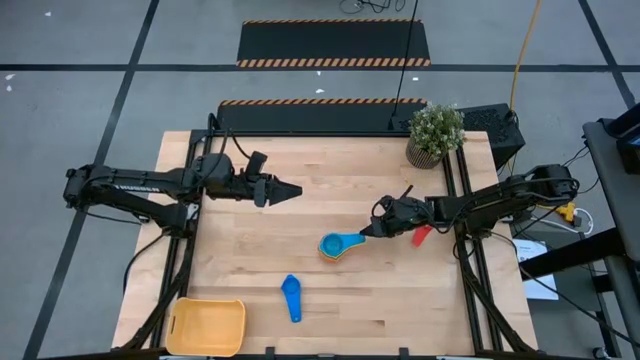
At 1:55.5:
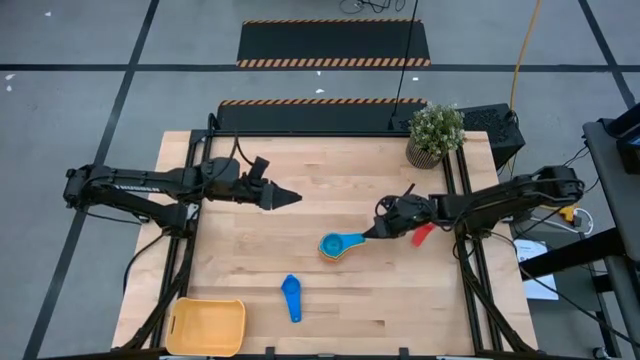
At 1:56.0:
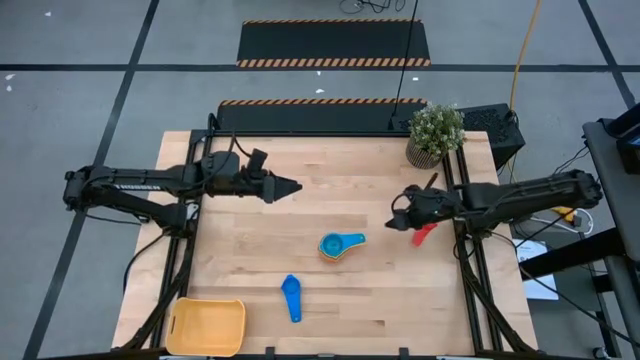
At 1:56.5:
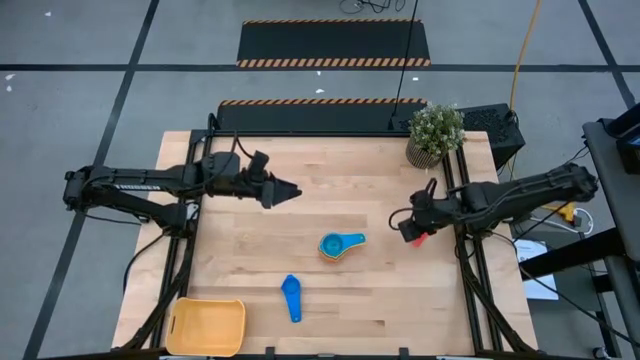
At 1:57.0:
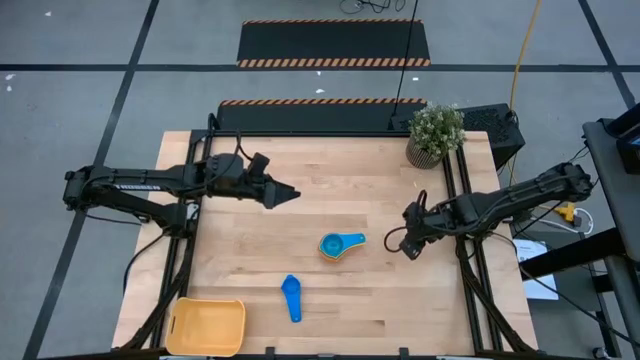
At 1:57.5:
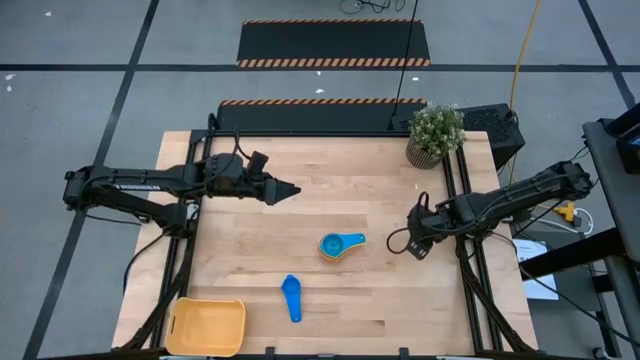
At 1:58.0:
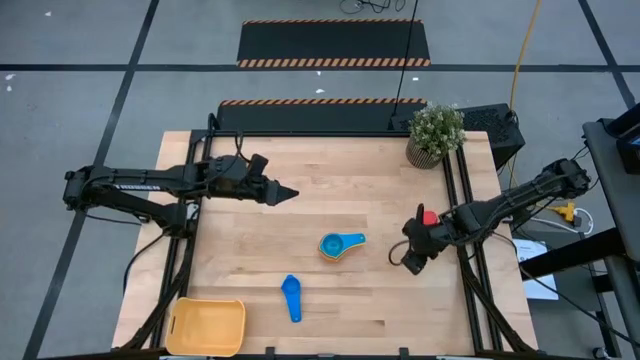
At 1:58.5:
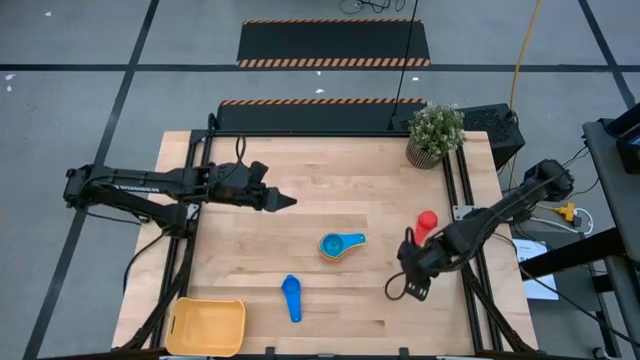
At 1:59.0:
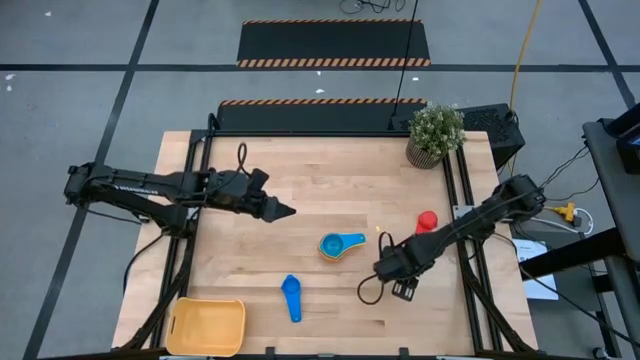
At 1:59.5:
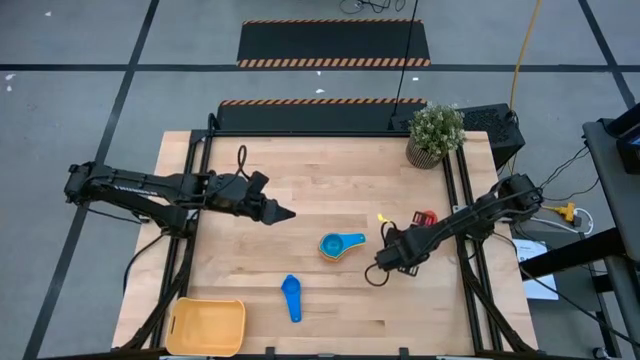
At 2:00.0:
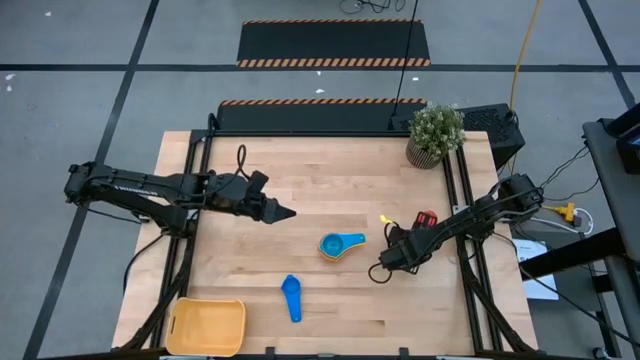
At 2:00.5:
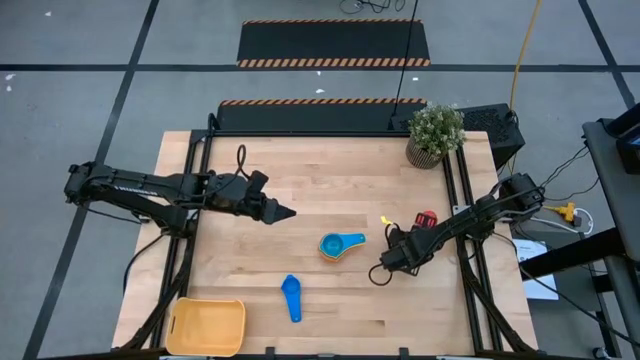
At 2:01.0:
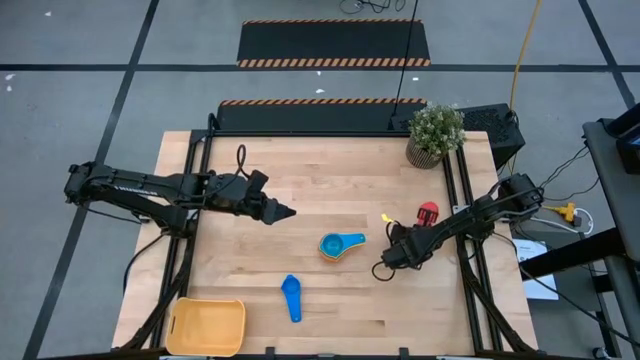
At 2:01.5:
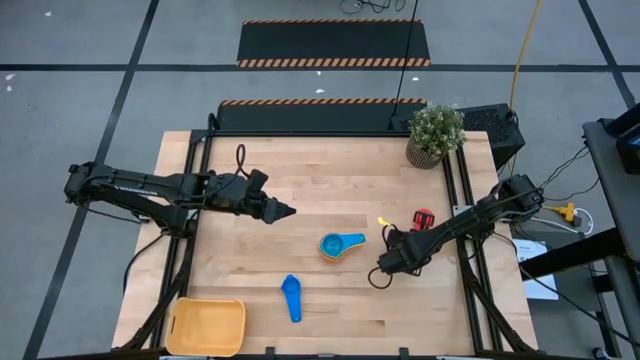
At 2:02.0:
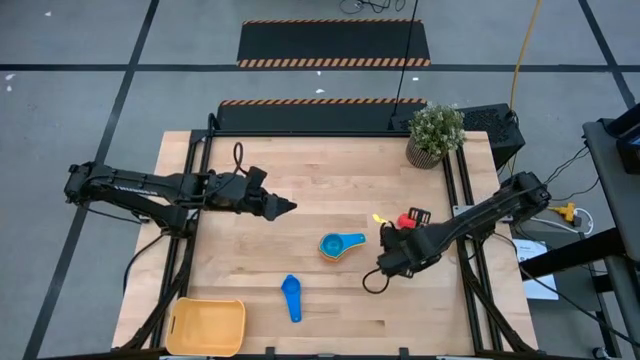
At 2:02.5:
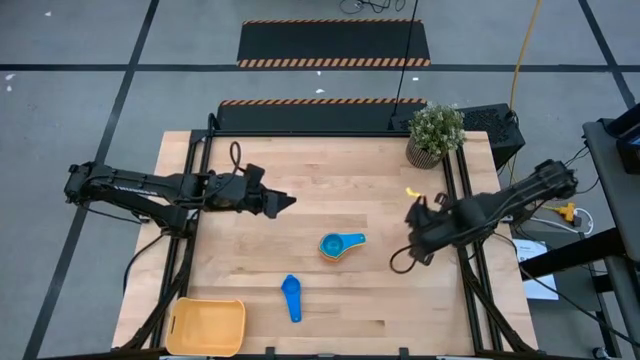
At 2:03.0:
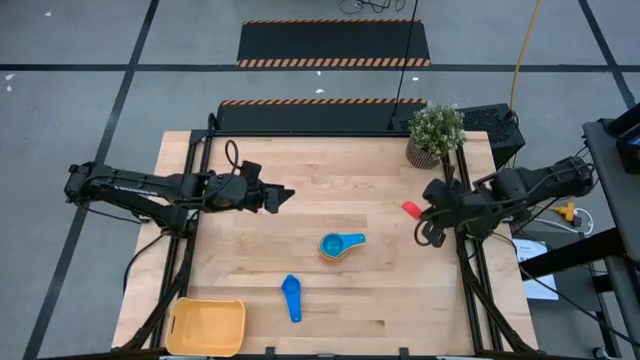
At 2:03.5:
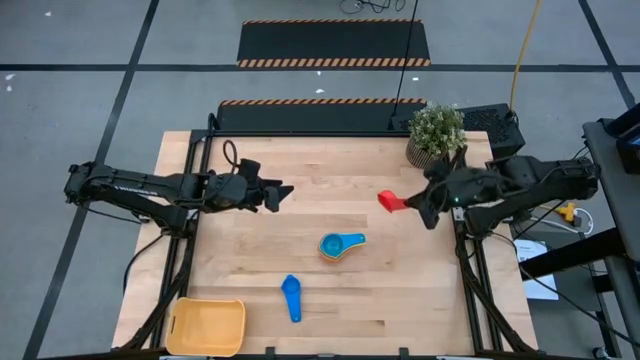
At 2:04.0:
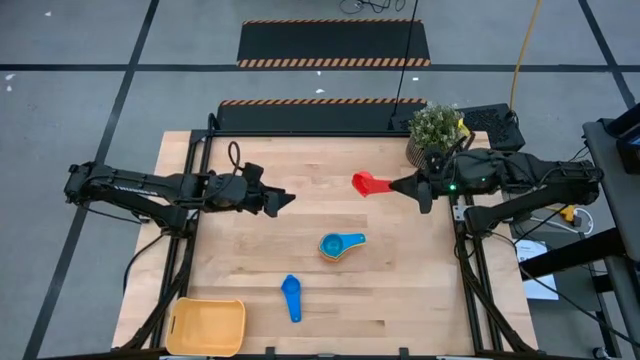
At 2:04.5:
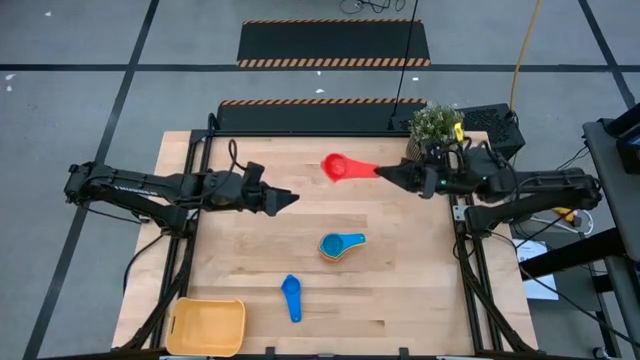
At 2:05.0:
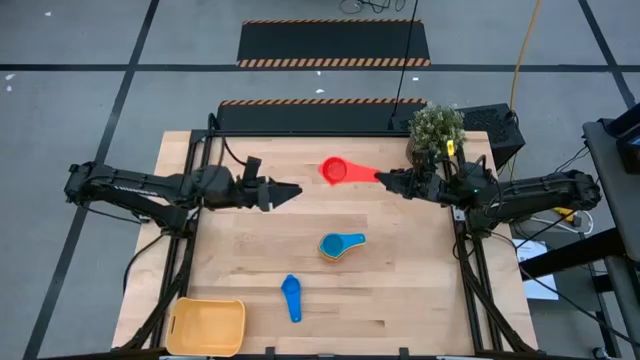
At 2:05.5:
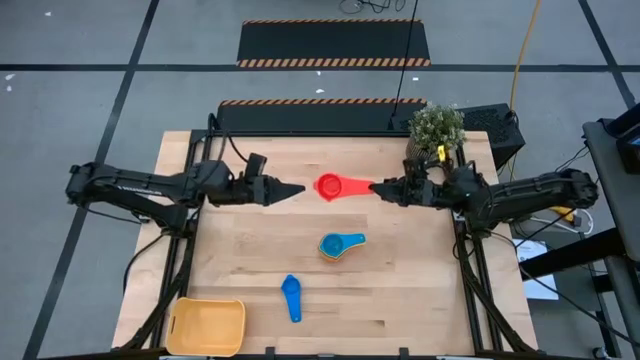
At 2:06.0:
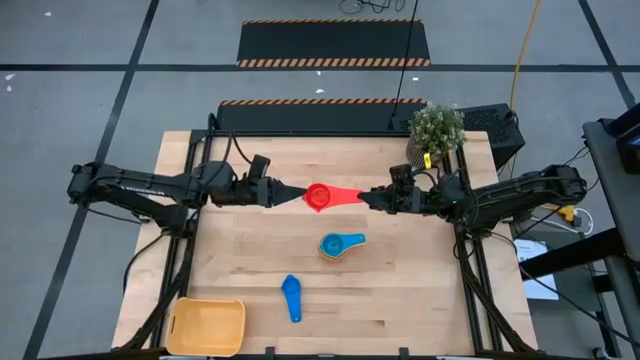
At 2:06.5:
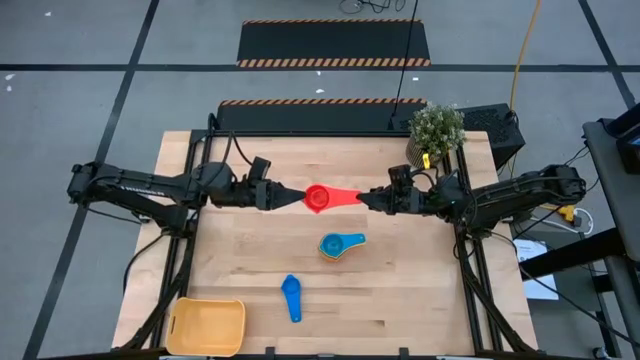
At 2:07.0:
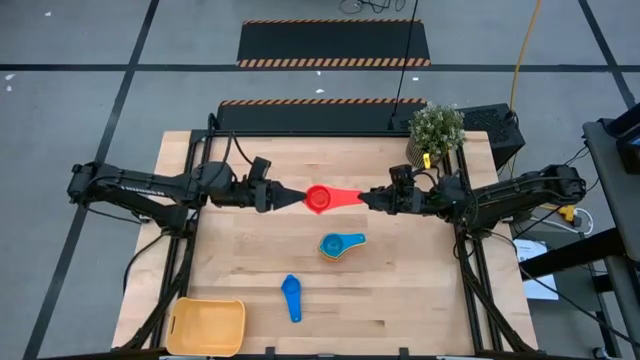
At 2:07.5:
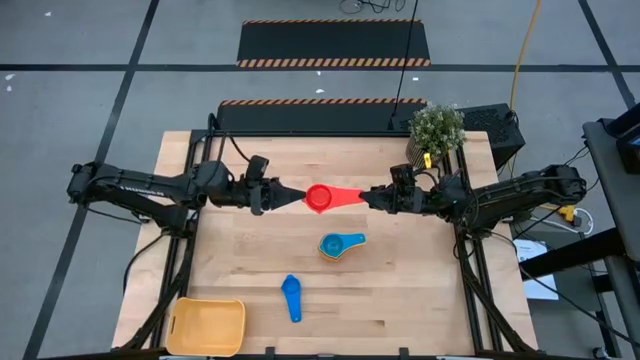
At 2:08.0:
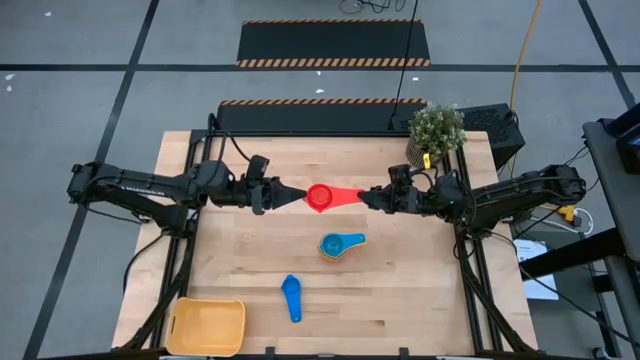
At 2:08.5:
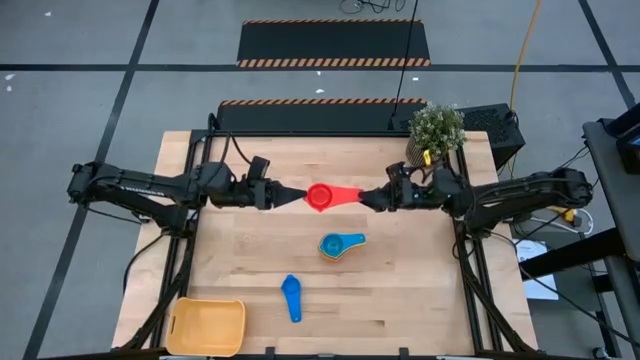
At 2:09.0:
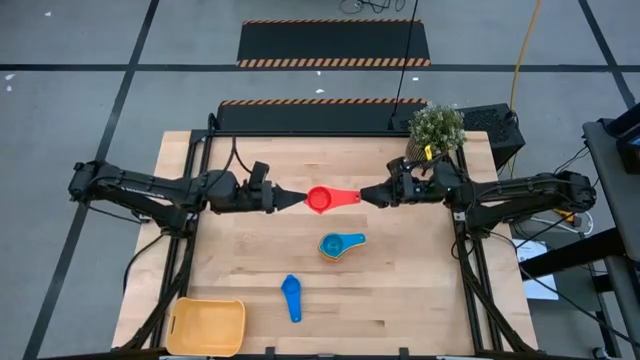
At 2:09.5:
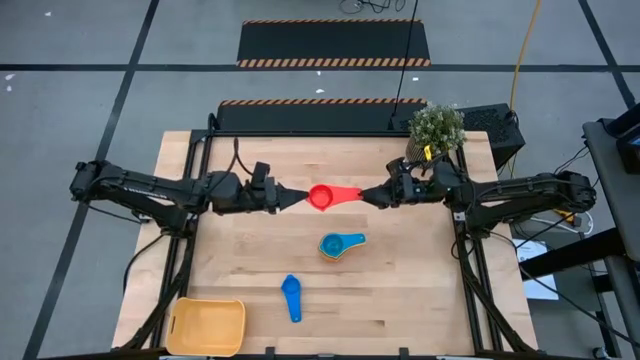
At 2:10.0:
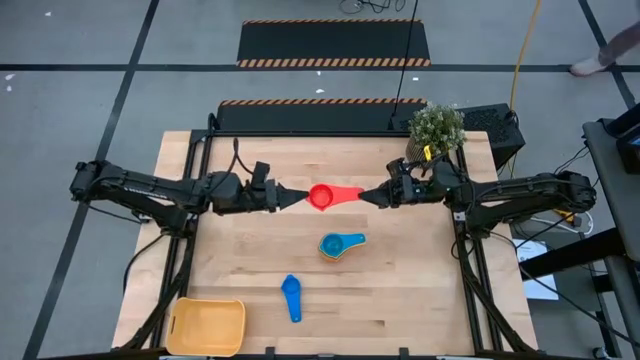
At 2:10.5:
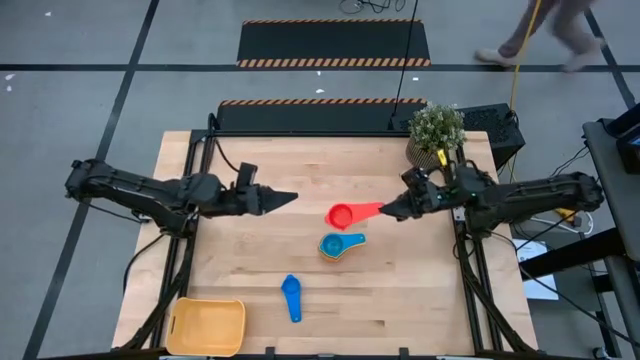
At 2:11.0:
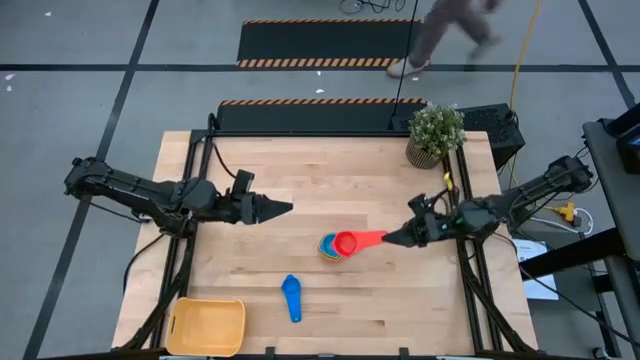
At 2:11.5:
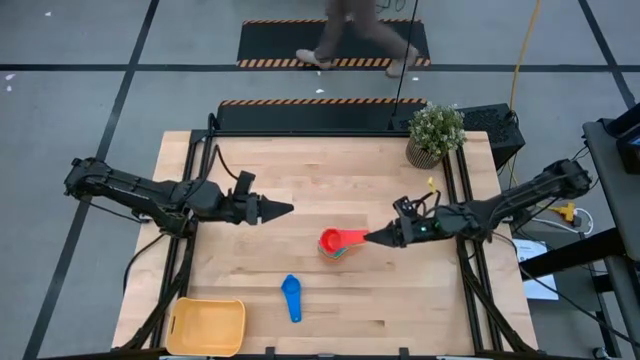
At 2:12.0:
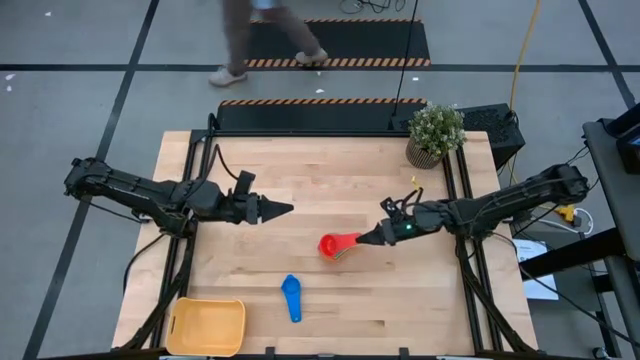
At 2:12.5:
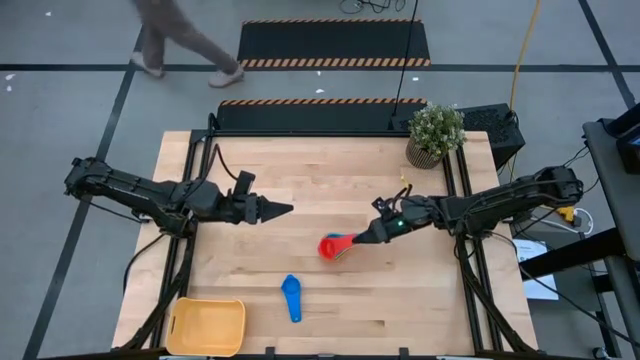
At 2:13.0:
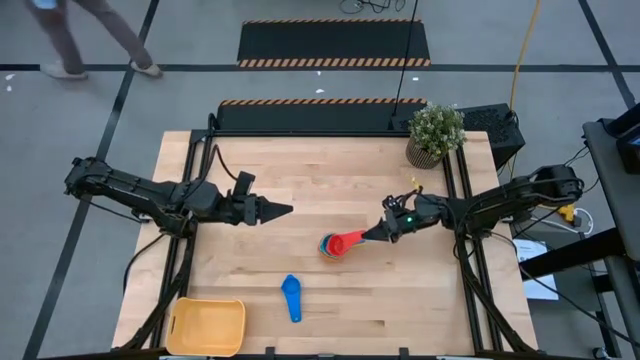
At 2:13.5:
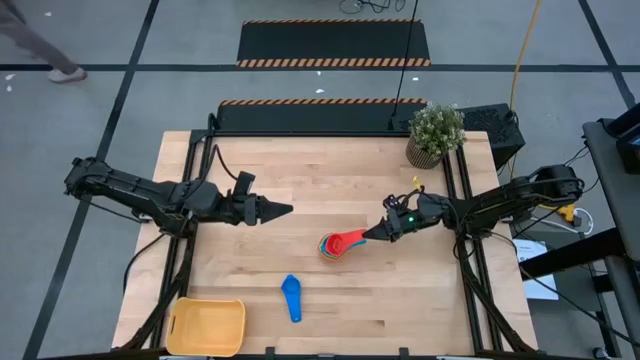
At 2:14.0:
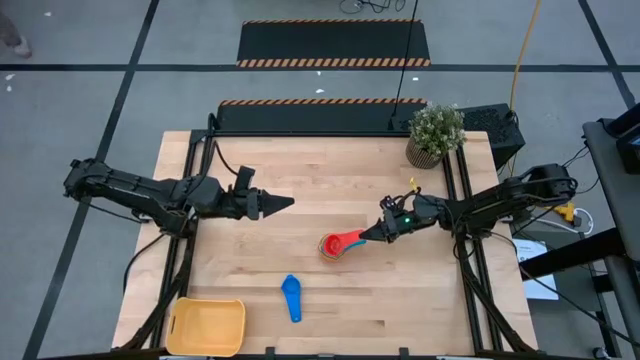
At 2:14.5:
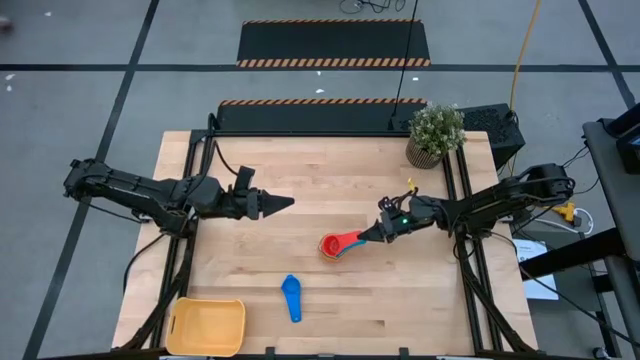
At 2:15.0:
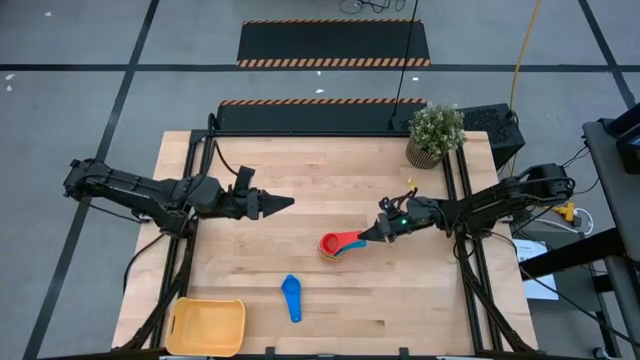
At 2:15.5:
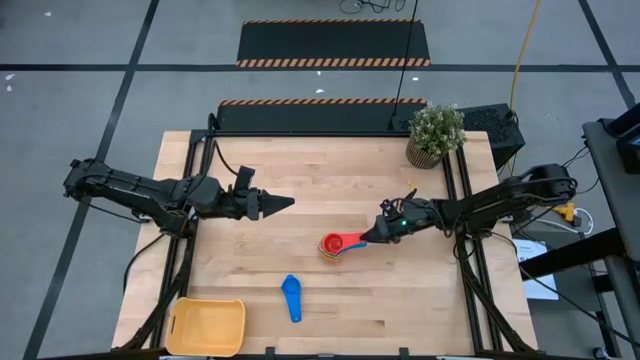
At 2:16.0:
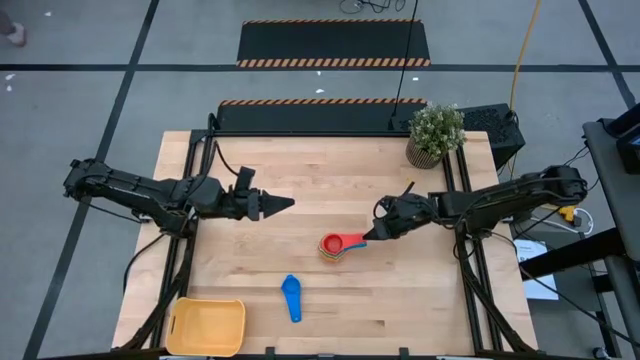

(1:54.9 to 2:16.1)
Task: Nest measuring cups in basket
Stack the red measuring cup on top of the light blue measuring cup
